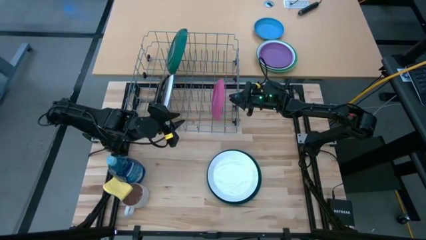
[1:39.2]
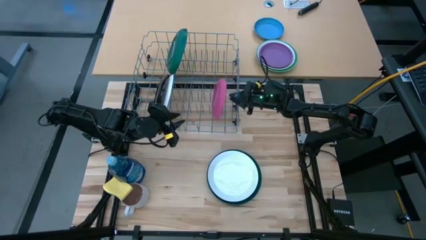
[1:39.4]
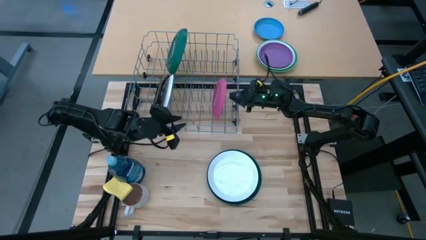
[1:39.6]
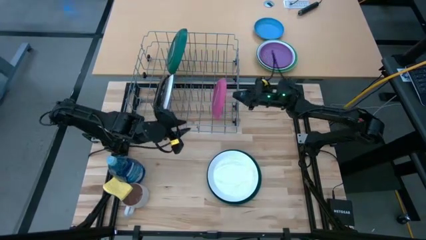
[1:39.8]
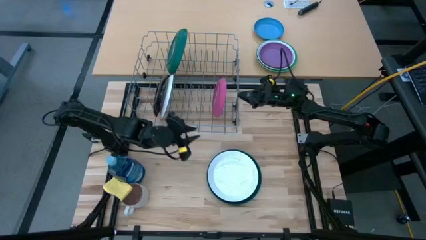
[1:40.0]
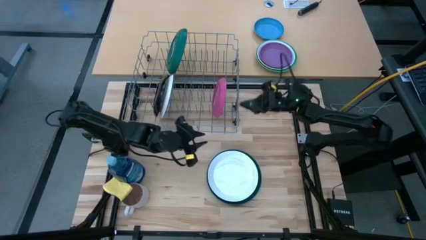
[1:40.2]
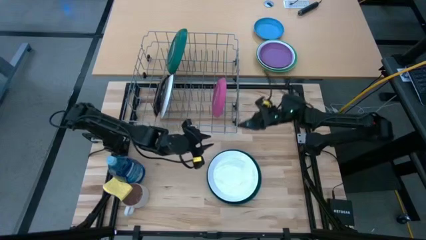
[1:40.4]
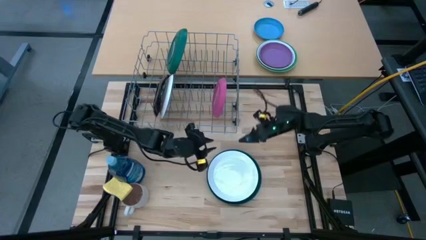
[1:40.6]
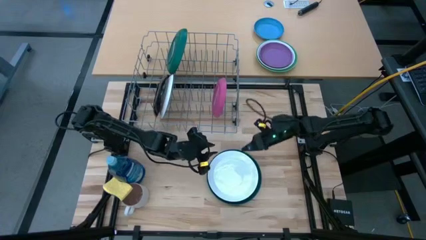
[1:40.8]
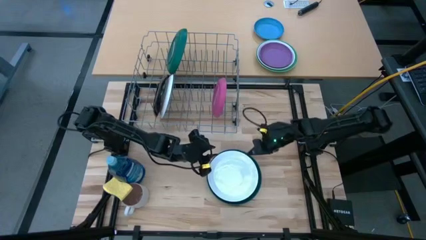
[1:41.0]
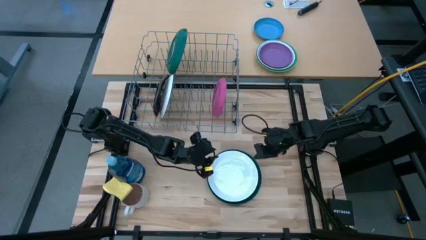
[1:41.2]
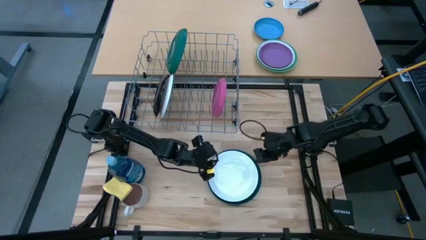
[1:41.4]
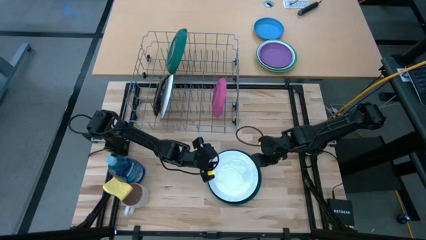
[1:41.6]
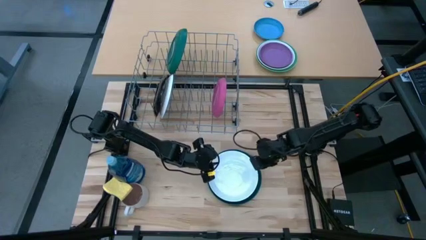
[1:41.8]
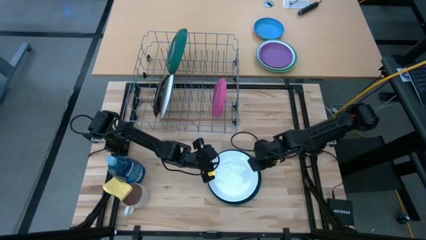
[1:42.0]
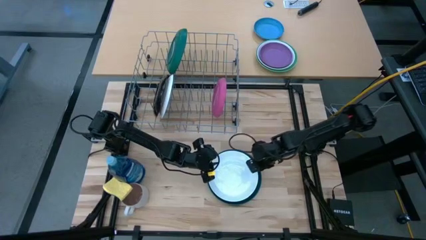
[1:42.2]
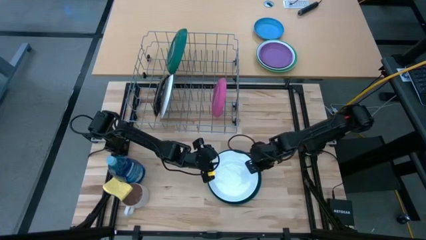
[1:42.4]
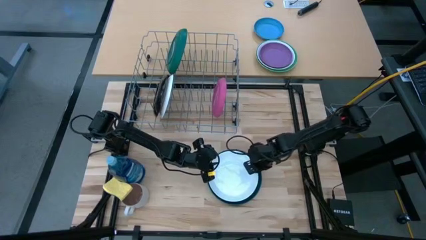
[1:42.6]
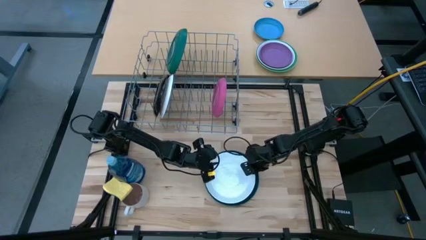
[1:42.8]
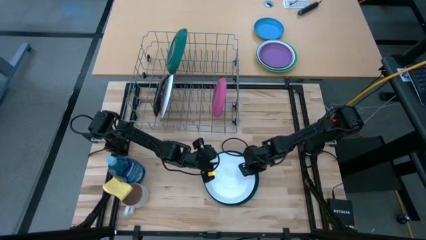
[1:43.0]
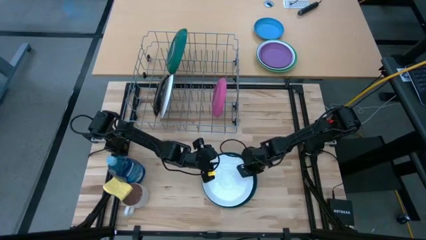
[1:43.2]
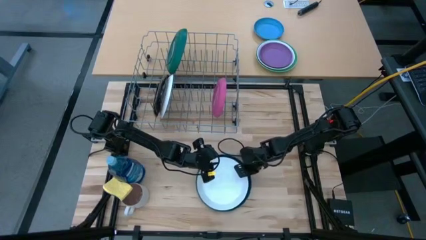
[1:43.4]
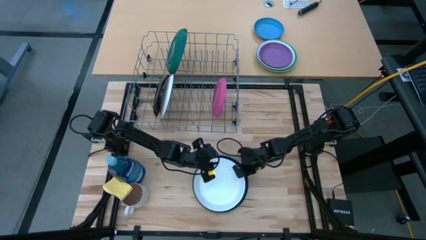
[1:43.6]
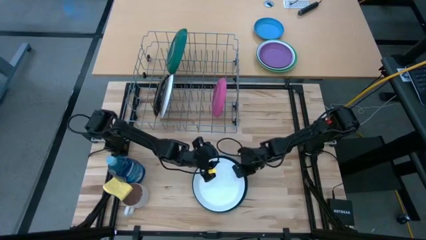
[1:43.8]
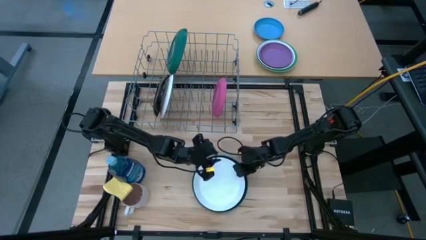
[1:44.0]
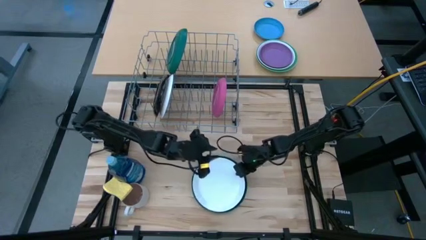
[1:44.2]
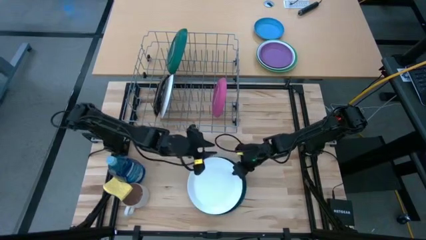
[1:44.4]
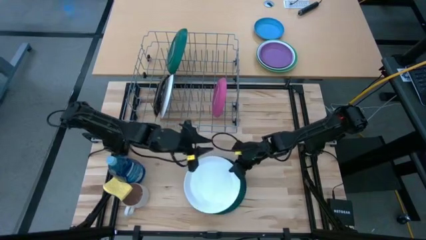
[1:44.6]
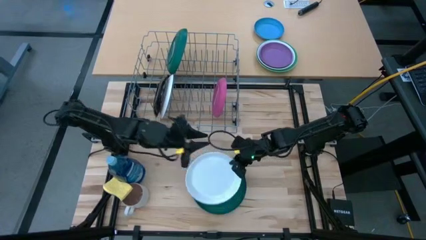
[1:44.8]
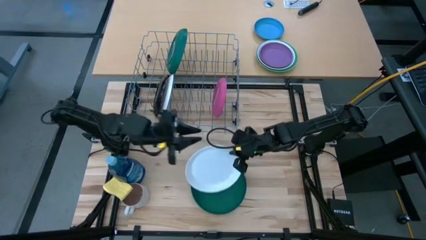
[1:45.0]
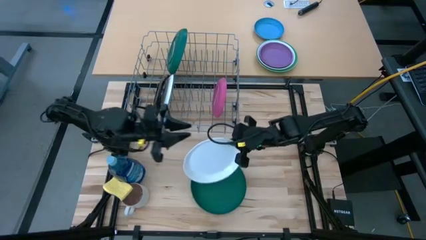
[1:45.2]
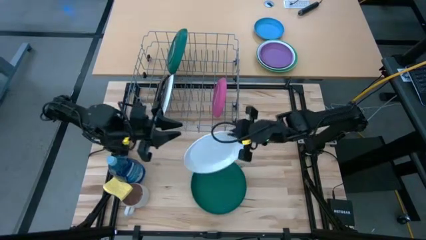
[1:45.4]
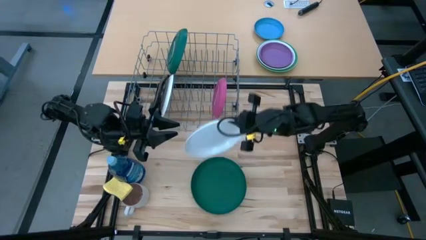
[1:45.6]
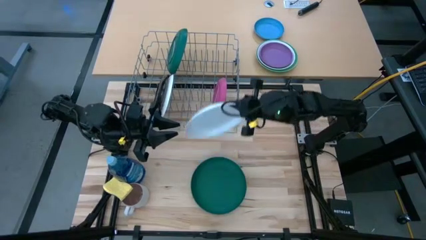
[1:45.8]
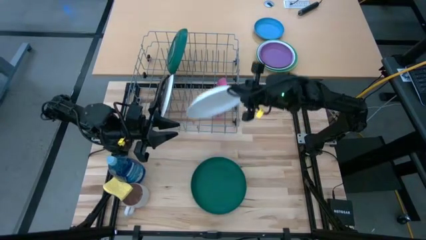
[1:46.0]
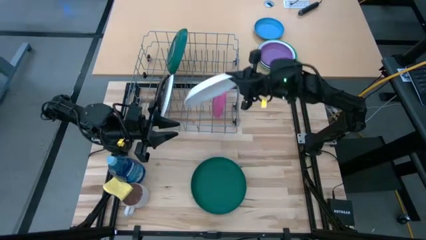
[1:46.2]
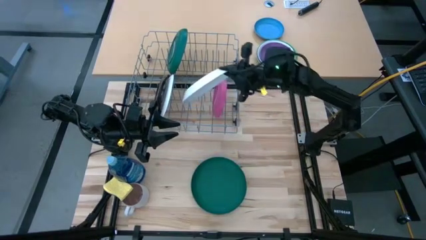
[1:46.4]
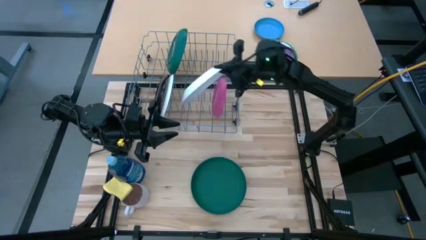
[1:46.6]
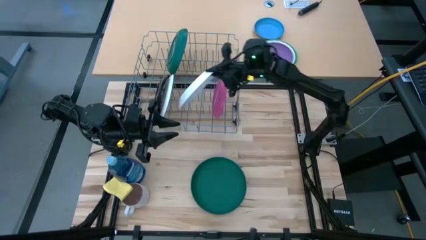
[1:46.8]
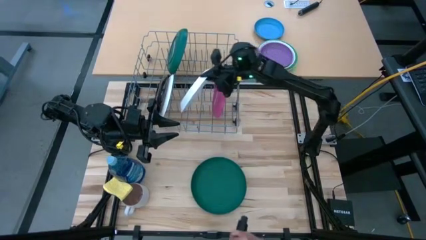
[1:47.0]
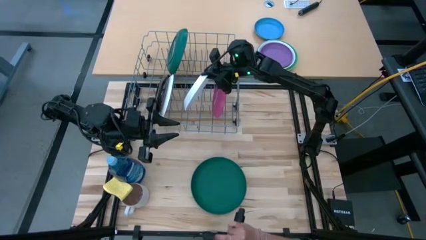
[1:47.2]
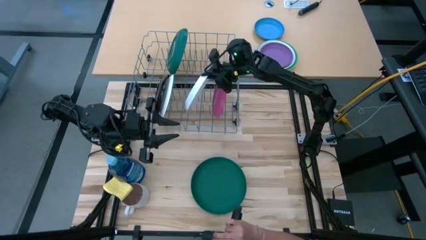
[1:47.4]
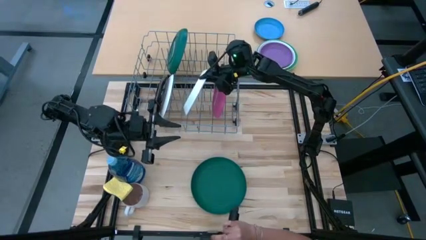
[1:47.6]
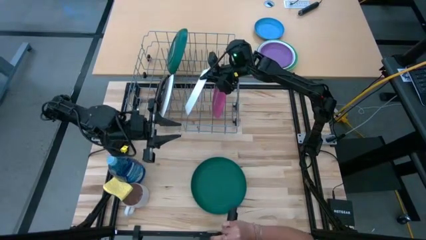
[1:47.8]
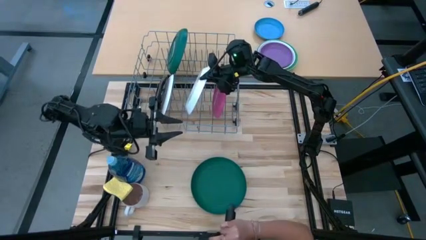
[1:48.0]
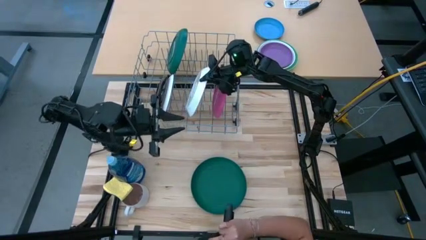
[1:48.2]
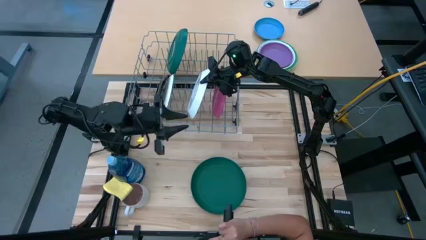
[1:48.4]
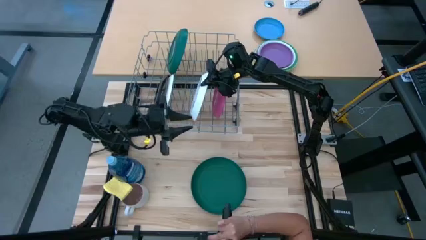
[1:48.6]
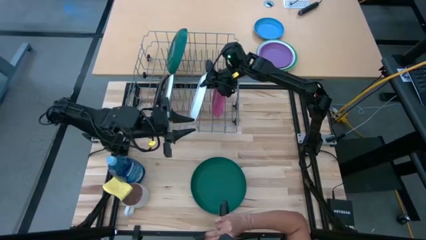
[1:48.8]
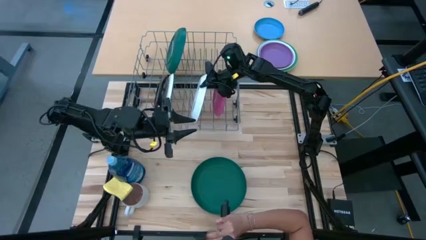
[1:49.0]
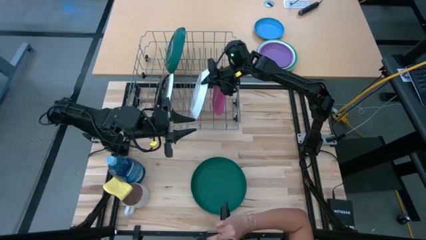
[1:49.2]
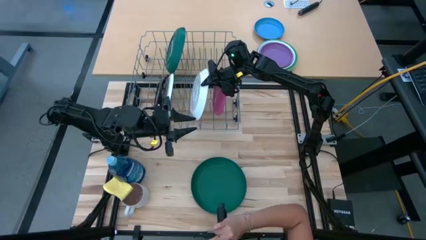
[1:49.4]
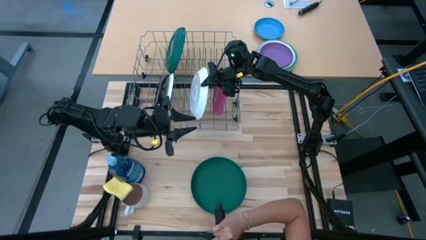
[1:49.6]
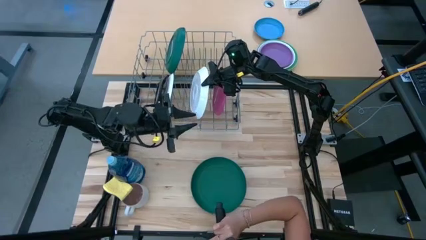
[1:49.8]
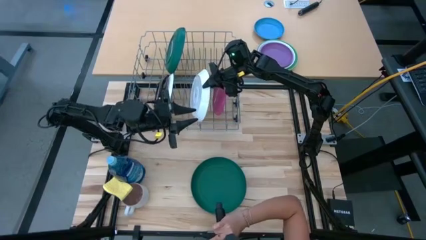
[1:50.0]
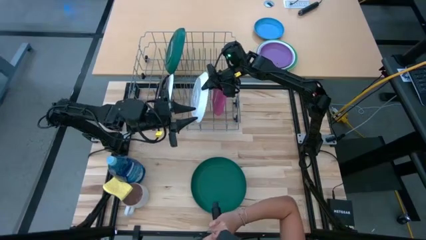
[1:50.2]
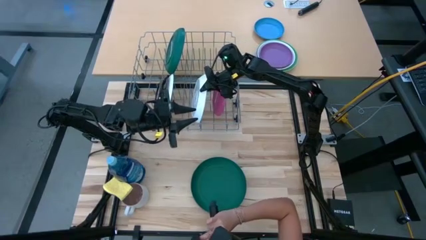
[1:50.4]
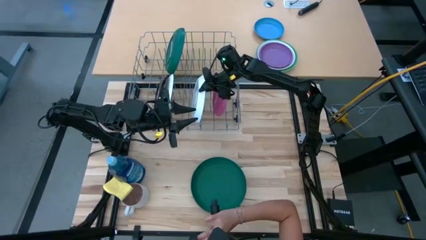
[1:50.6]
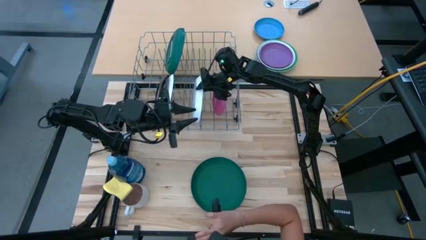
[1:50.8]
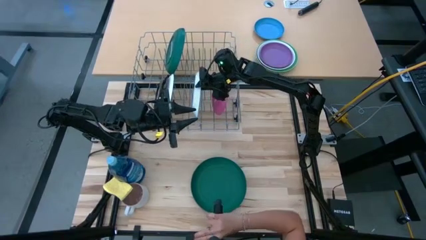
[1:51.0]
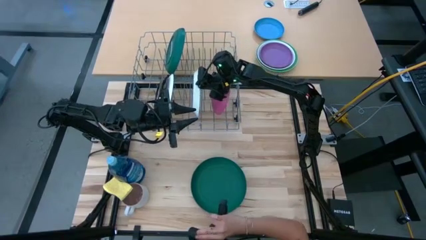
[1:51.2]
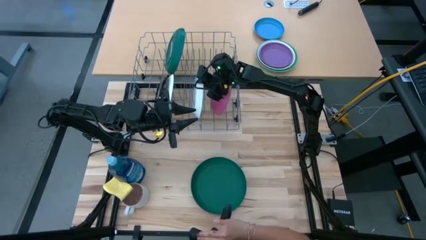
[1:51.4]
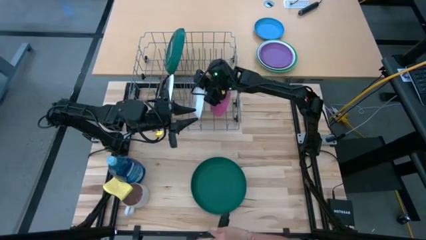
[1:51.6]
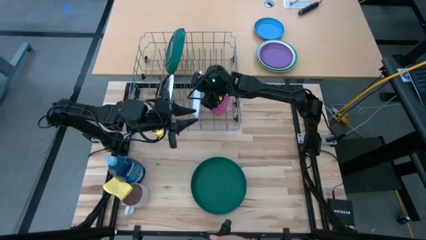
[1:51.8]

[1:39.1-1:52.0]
Task: Sort dishes
Put the white plate on the dish rack
